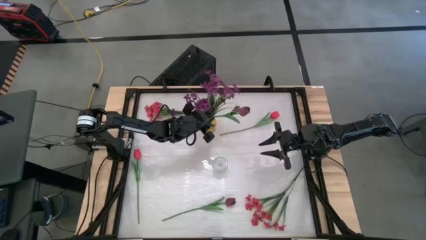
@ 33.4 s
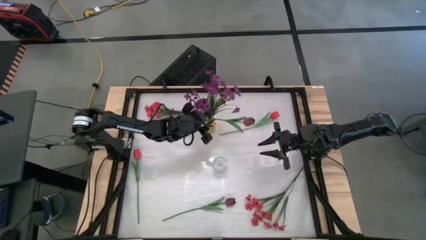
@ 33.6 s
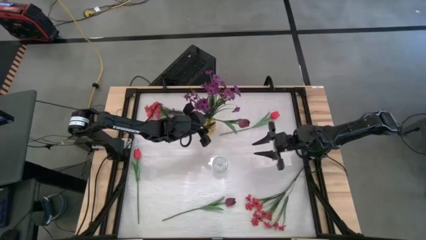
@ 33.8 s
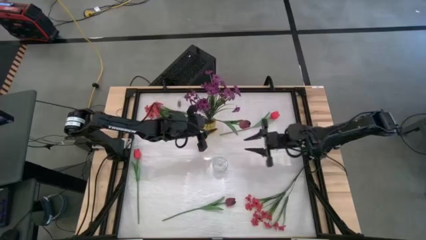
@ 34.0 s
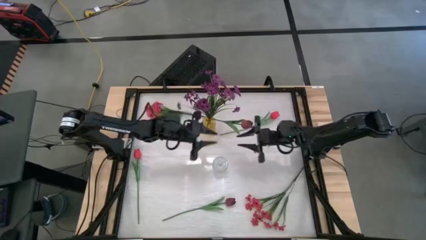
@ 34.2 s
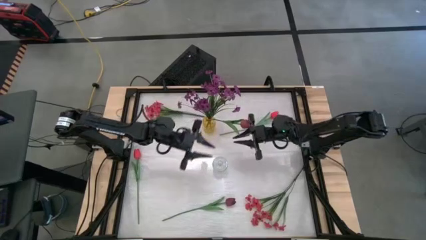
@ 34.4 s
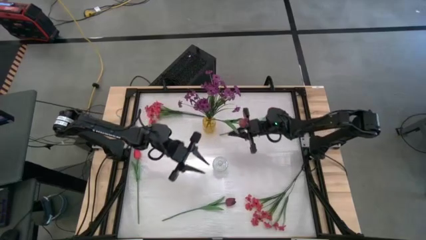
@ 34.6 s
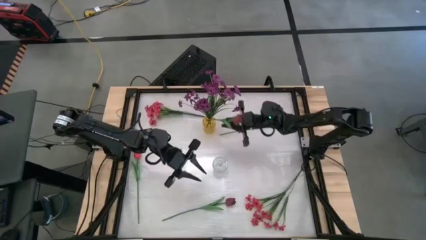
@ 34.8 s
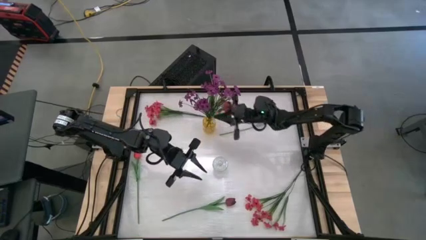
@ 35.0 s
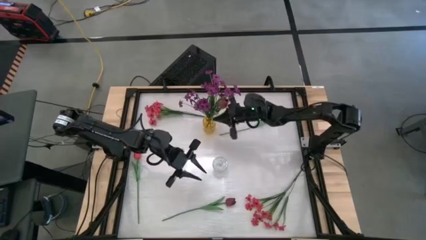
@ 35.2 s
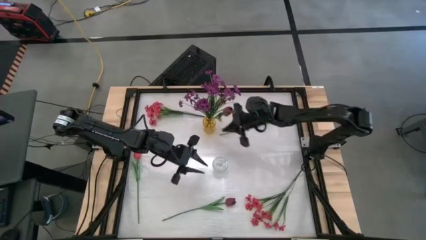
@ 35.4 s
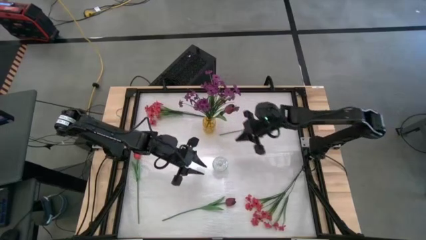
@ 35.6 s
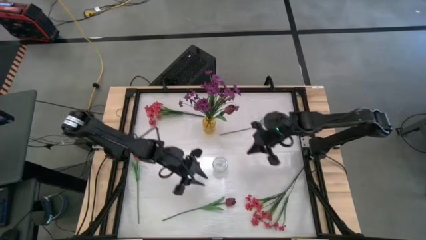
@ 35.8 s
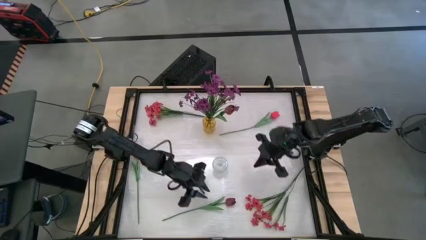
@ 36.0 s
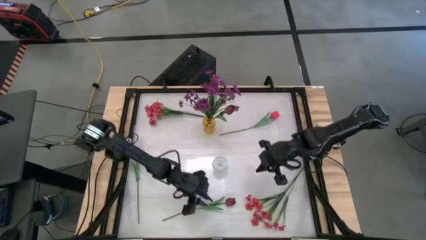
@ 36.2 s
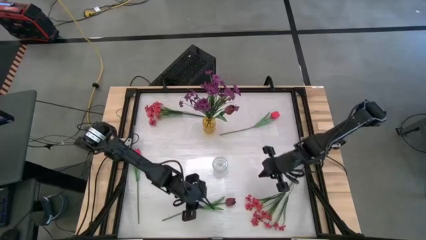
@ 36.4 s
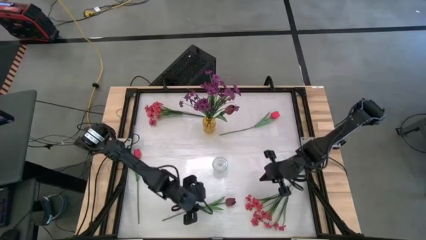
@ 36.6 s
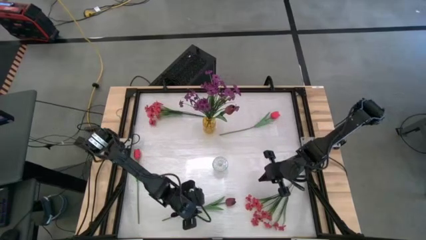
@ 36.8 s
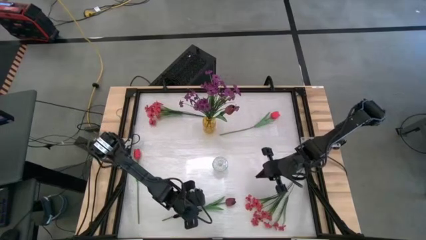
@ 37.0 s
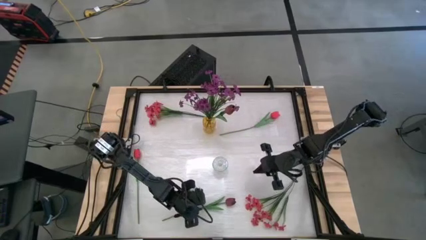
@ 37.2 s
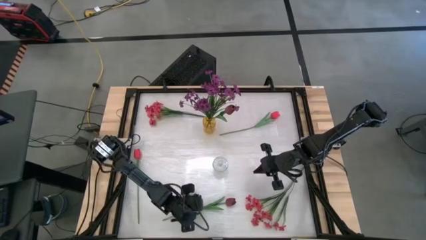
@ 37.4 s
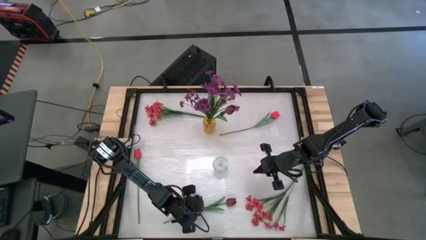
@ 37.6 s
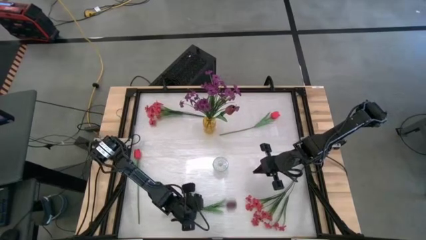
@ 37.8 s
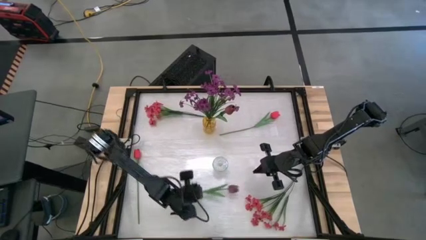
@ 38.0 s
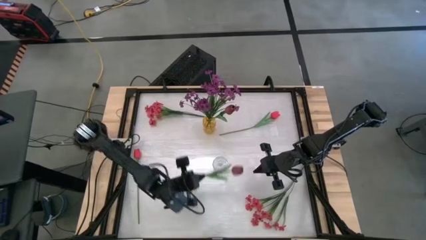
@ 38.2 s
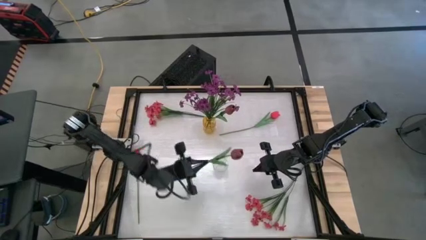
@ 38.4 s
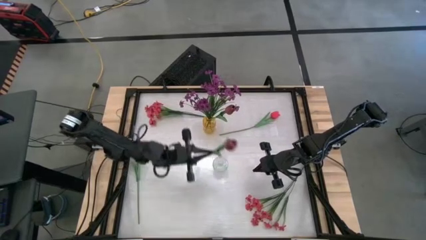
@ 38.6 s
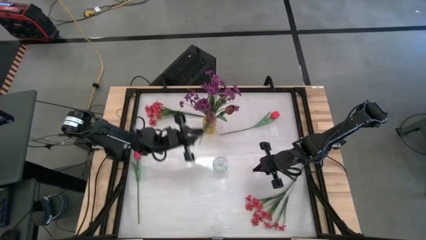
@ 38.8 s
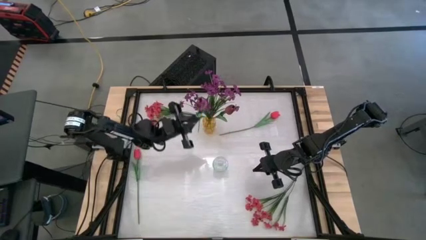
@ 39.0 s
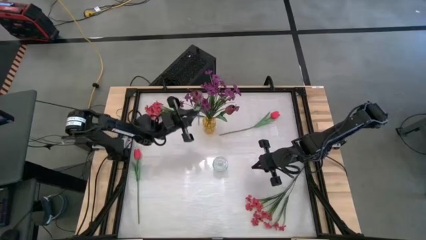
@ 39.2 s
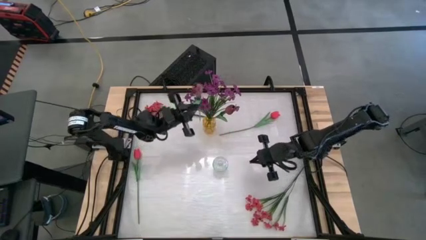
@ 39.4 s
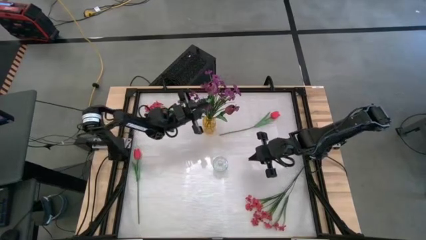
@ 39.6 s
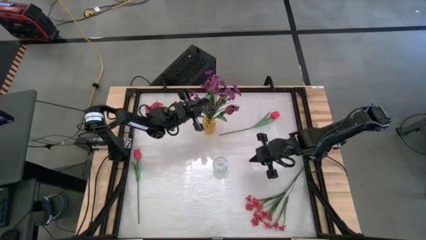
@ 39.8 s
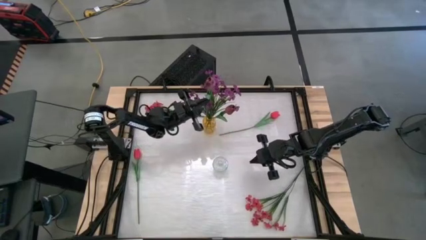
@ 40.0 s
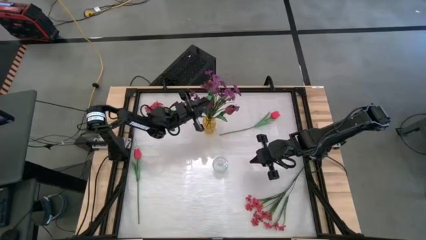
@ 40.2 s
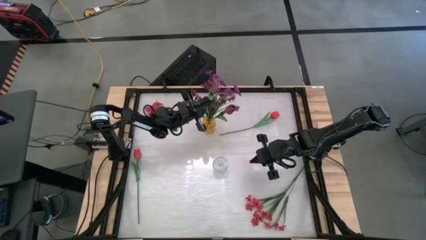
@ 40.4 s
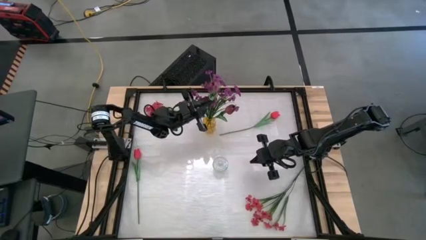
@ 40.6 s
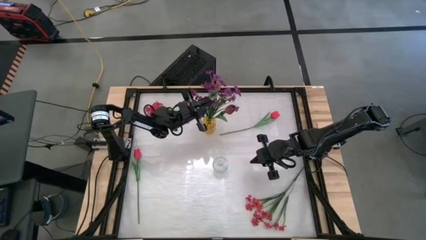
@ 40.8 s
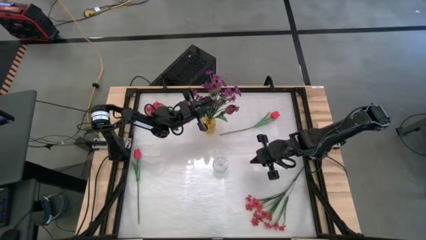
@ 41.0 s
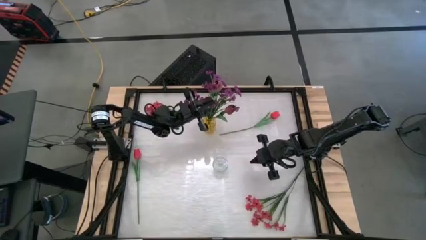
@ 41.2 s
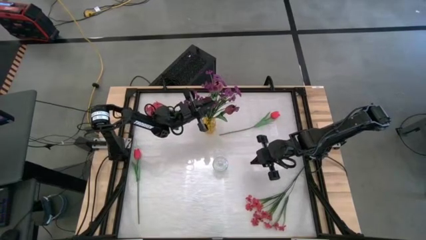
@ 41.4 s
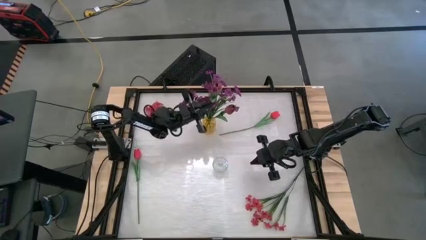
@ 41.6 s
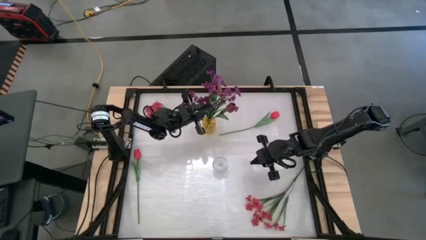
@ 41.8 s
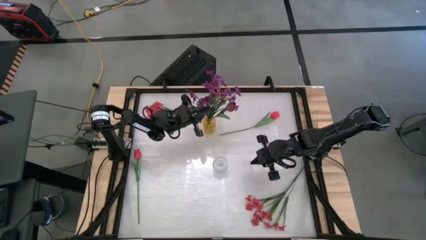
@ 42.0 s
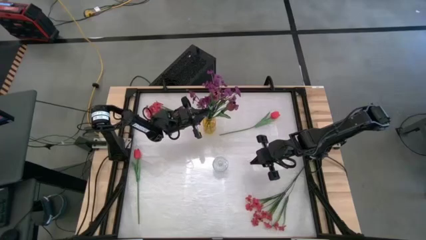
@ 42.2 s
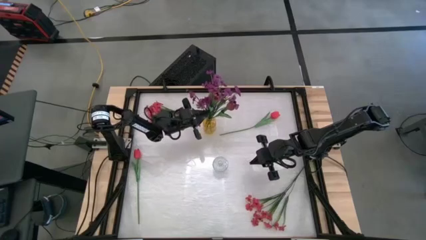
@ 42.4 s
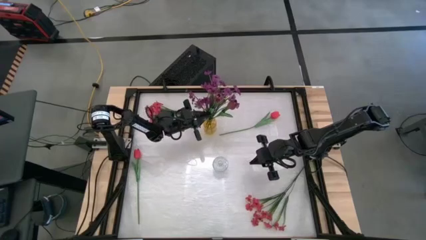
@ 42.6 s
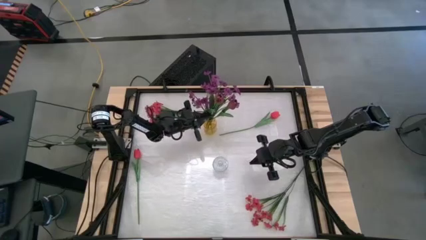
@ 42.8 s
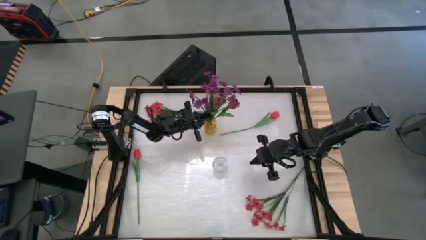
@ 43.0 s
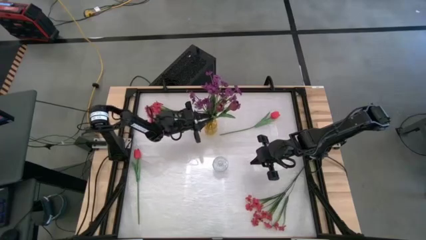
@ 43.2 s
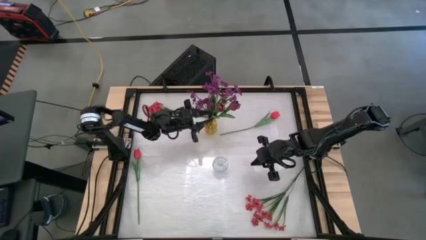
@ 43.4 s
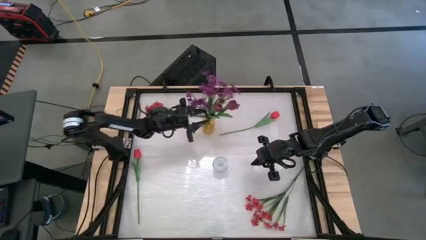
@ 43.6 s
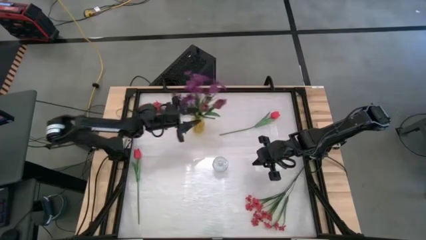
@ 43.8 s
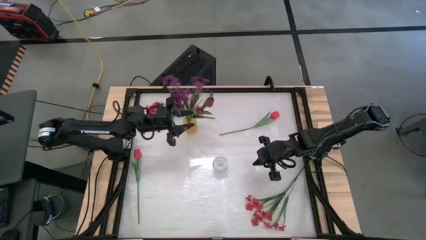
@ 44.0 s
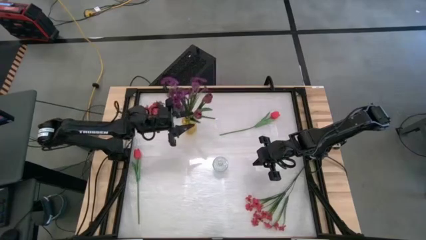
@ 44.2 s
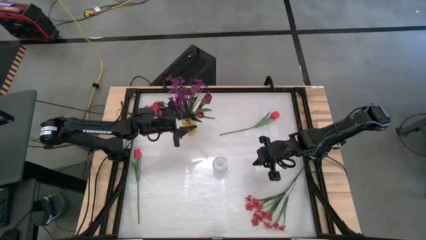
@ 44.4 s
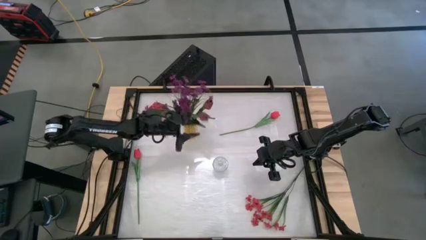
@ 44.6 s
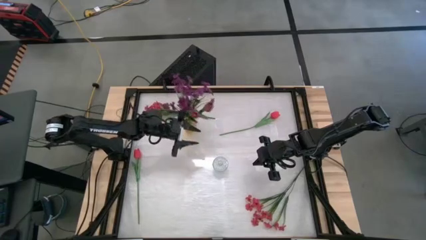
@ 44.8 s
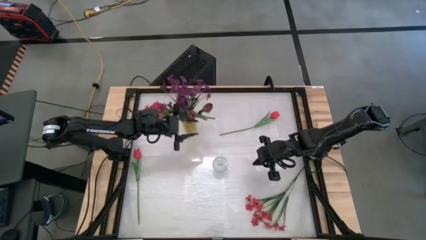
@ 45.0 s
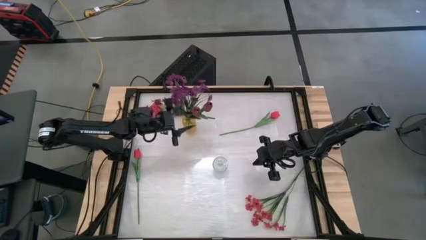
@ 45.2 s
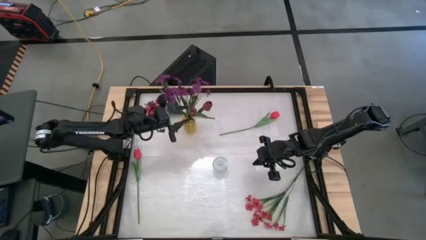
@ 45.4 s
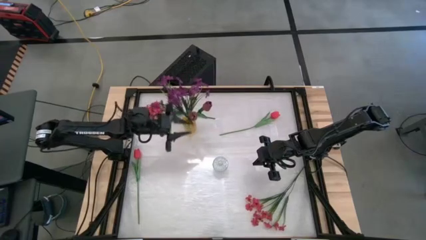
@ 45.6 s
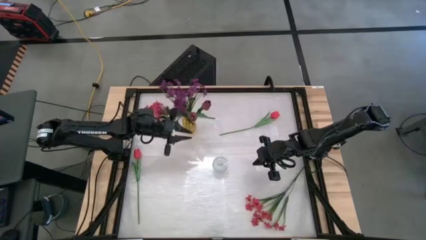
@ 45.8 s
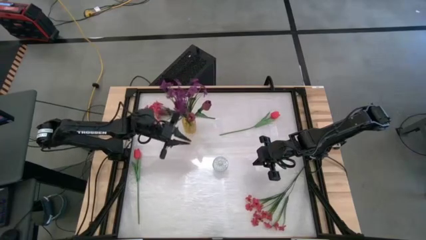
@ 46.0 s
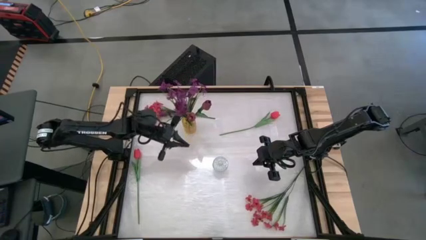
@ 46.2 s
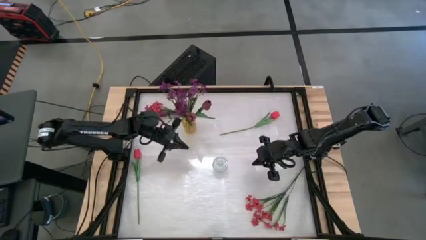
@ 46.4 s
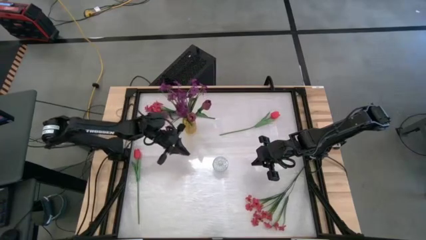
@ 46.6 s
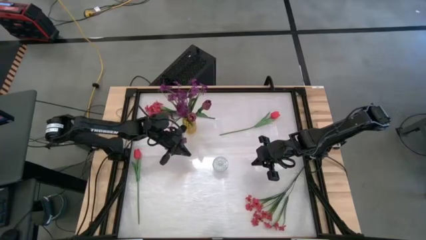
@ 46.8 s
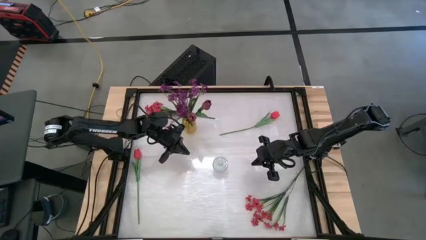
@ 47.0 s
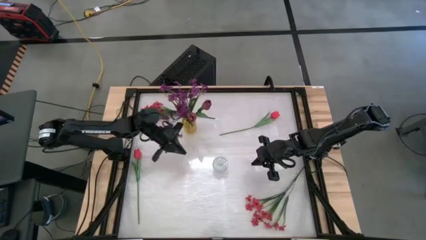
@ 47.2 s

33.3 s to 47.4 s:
Task: Sort flowers into vase by color
Put the purple flower into the yellow vase

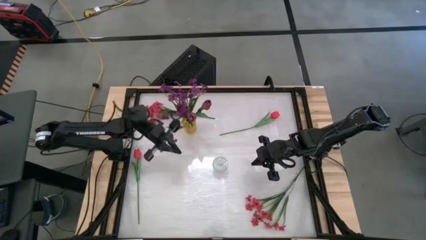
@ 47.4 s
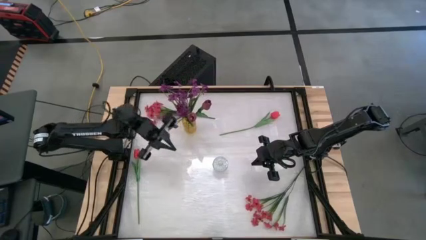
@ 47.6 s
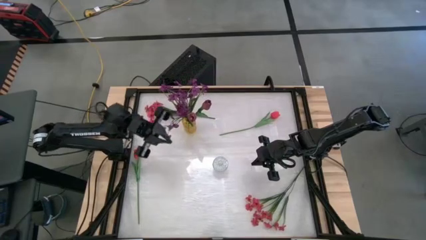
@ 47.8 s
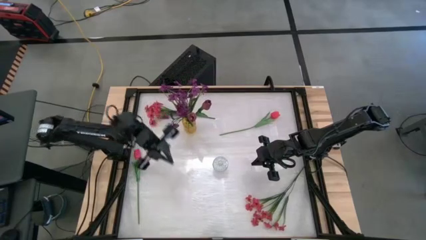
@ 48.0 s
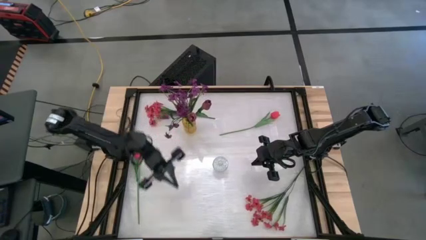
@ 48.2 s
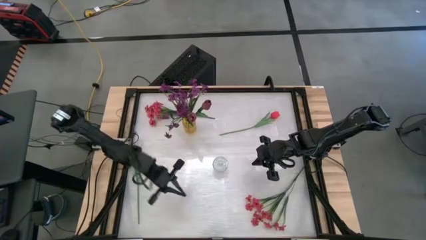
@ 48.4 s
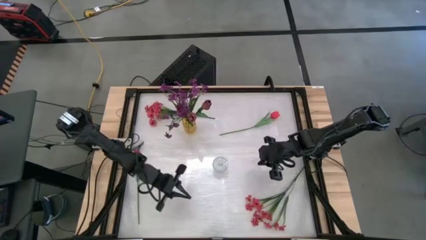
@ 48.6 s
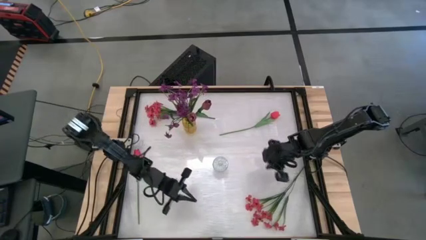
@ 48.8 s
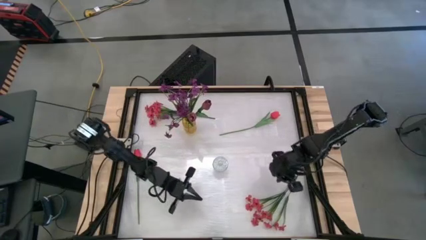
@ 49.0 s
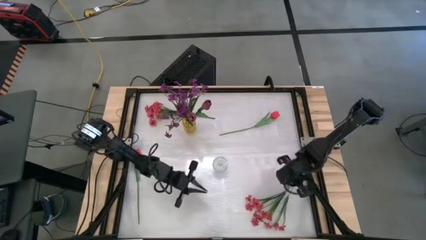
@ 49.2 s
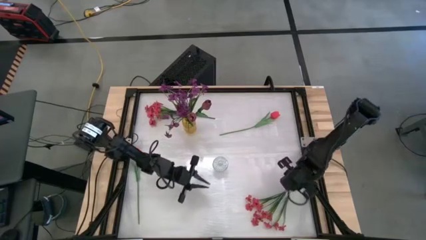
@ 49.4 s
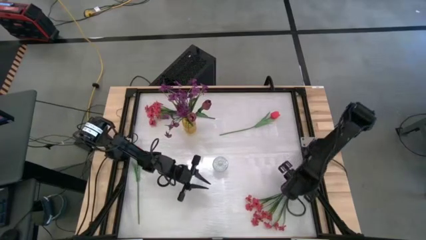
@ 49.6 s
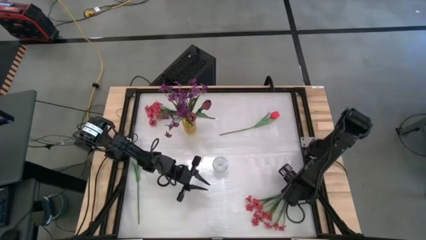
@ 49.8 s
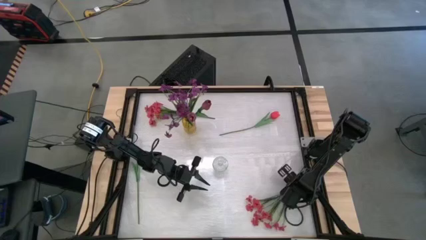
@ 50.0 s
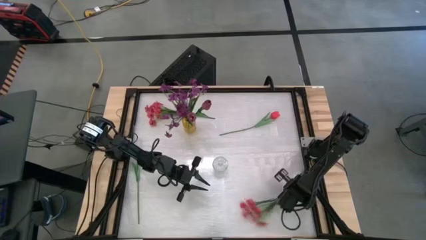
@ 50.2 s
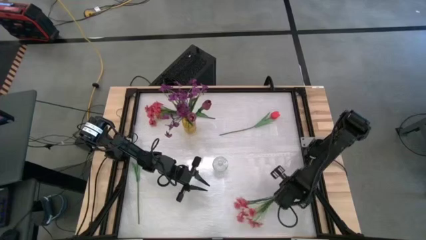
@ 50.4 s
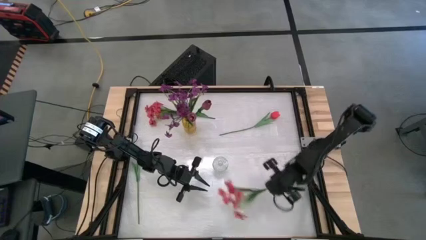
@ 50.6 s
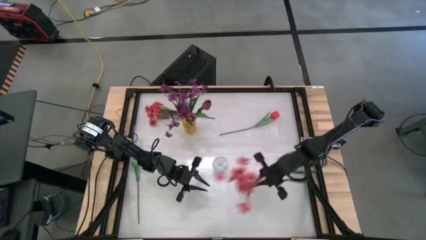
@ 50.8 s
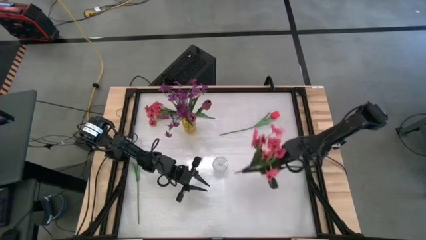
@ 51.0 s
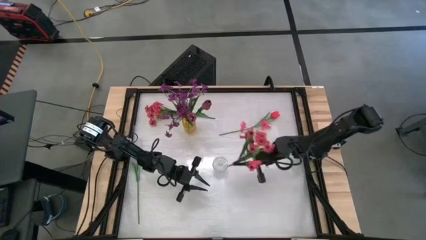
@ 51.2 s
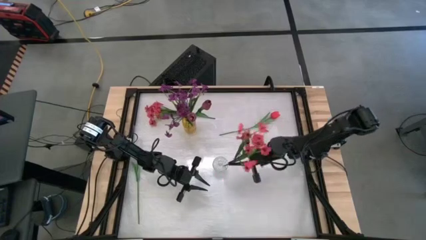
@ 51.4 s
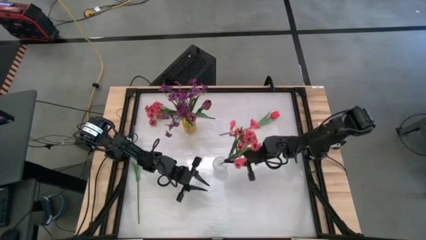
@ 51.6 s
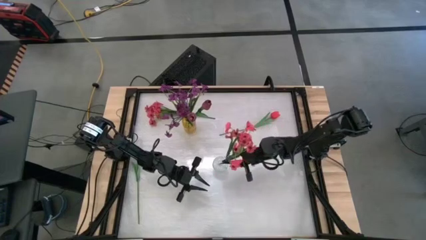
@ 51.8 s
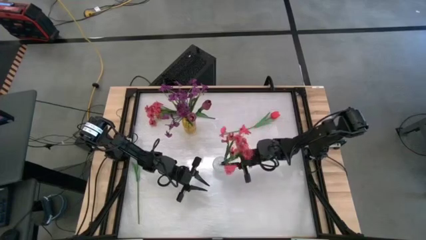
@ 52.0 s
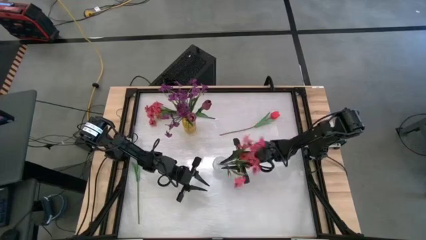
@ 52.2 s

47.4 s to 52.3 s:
Put the bottom pink flowers into the transparent vase
